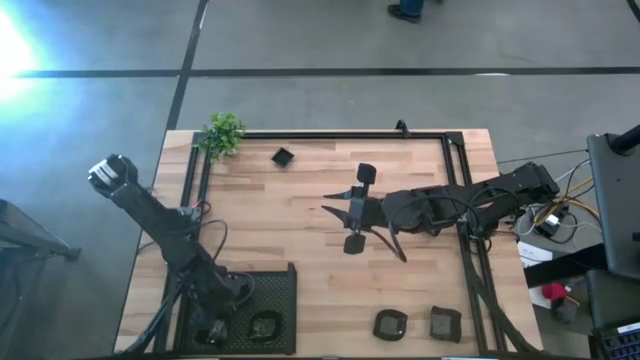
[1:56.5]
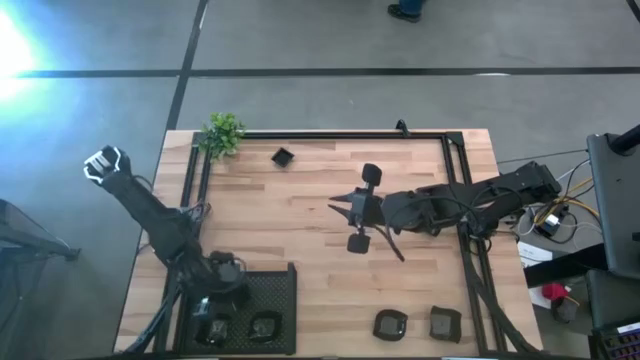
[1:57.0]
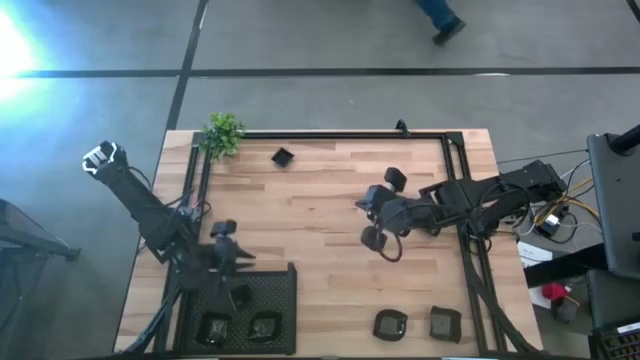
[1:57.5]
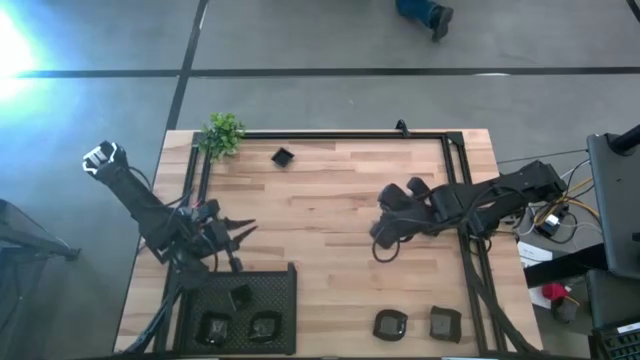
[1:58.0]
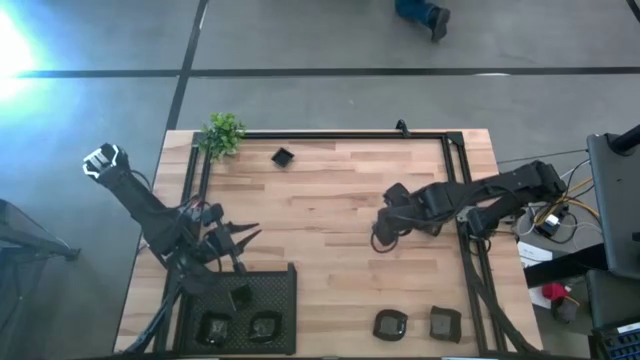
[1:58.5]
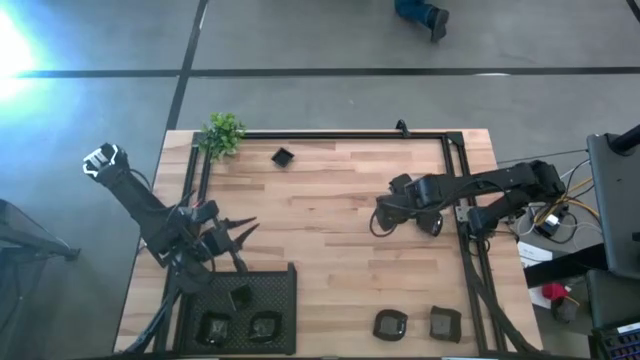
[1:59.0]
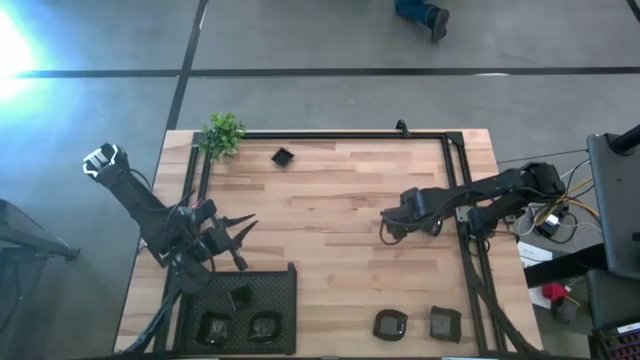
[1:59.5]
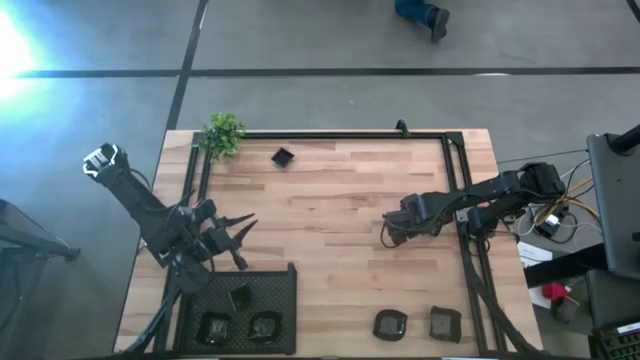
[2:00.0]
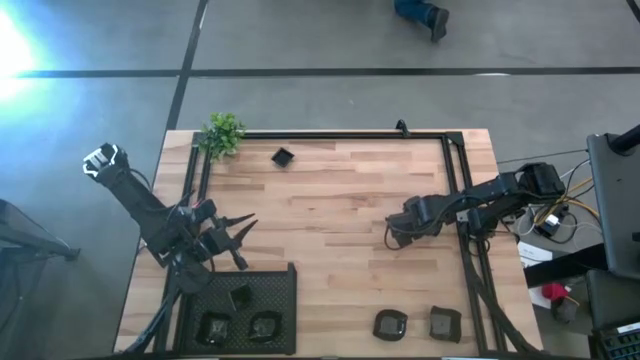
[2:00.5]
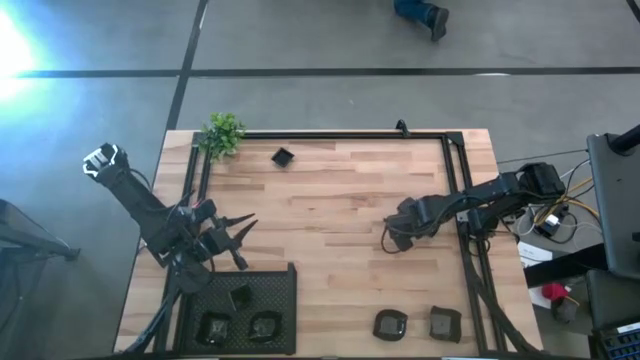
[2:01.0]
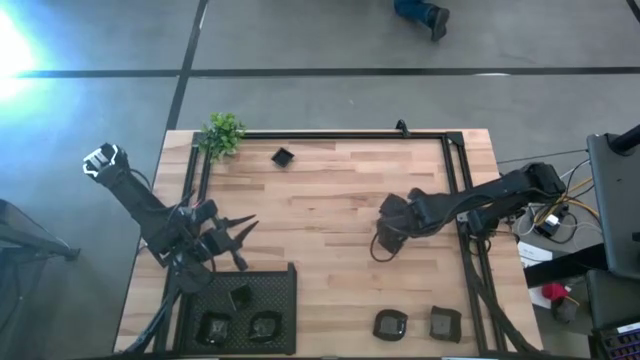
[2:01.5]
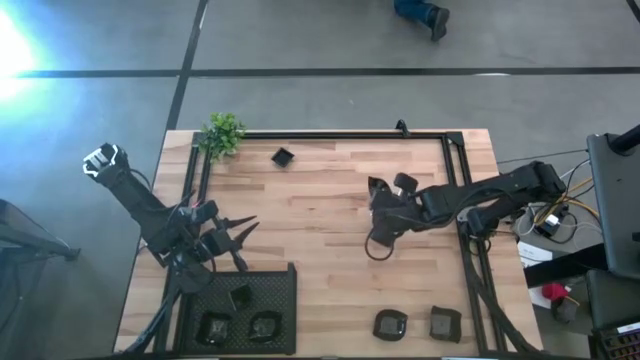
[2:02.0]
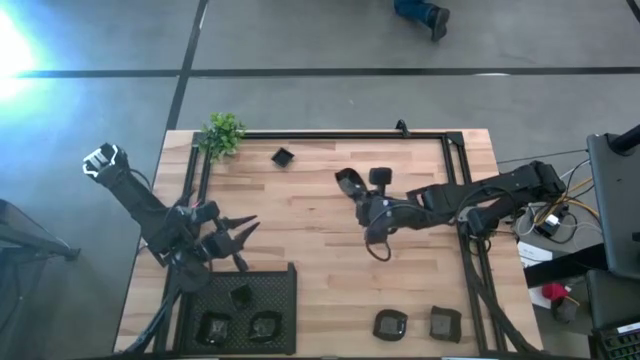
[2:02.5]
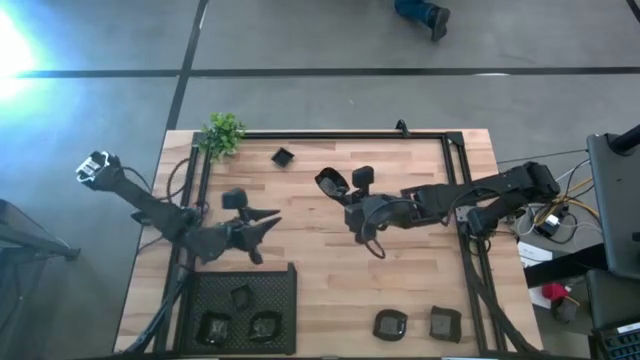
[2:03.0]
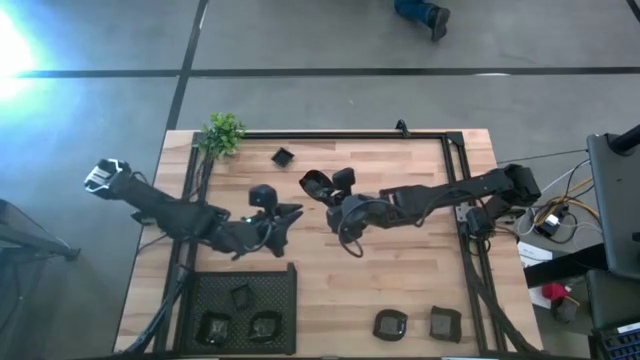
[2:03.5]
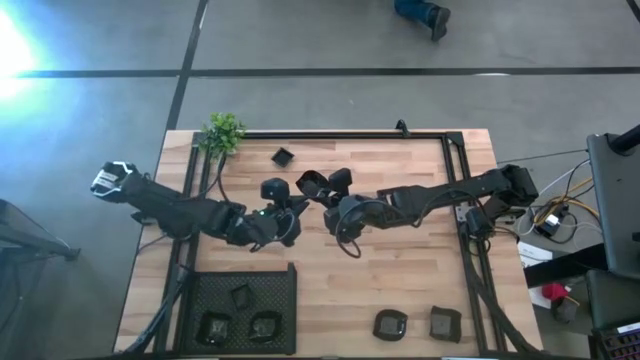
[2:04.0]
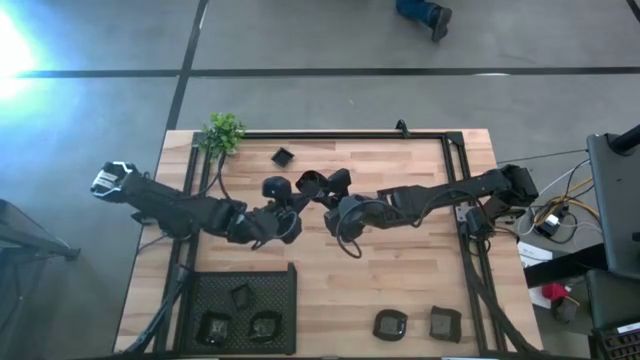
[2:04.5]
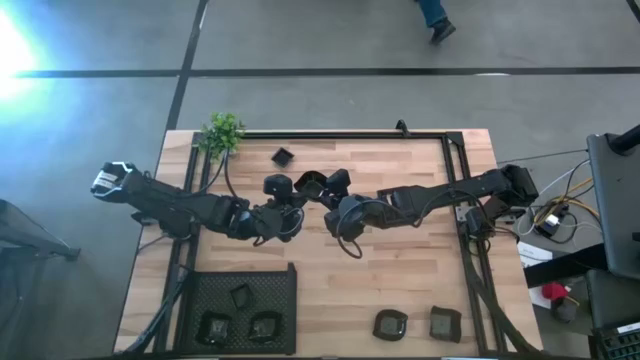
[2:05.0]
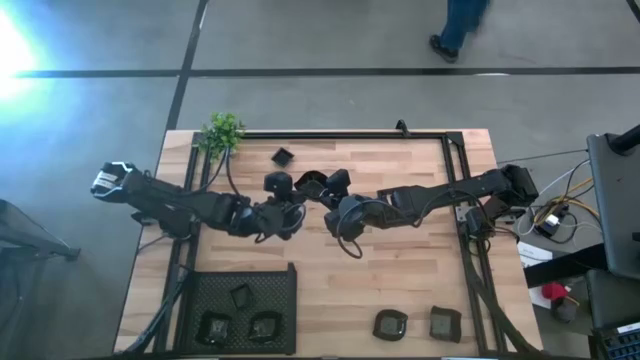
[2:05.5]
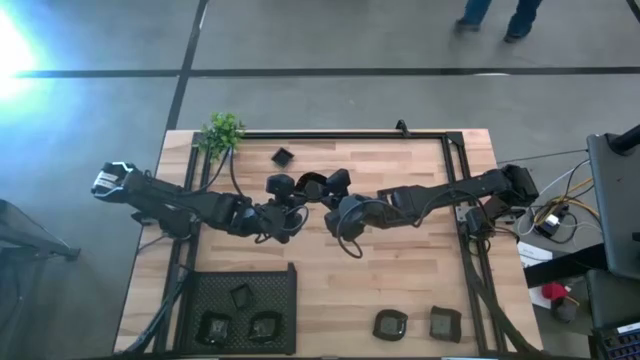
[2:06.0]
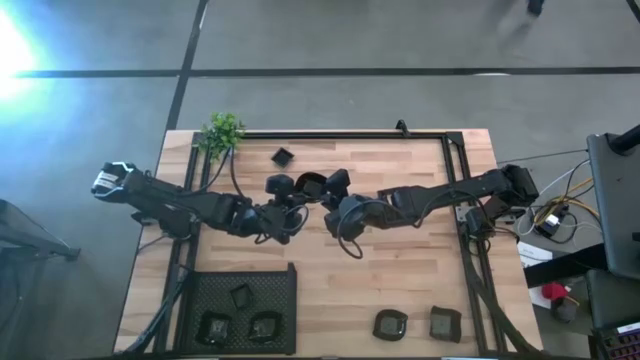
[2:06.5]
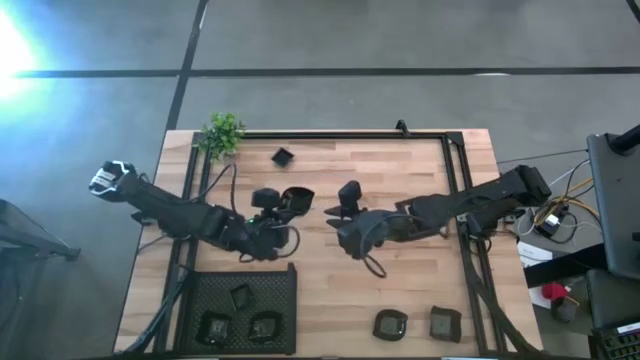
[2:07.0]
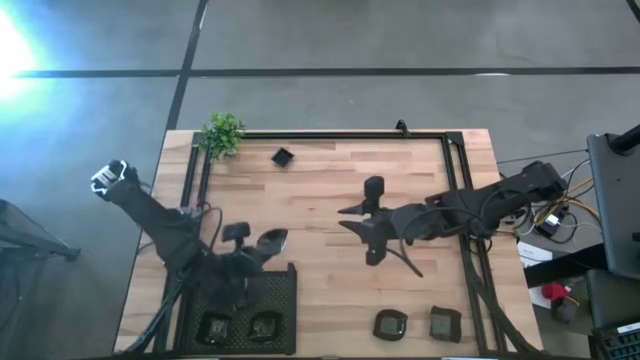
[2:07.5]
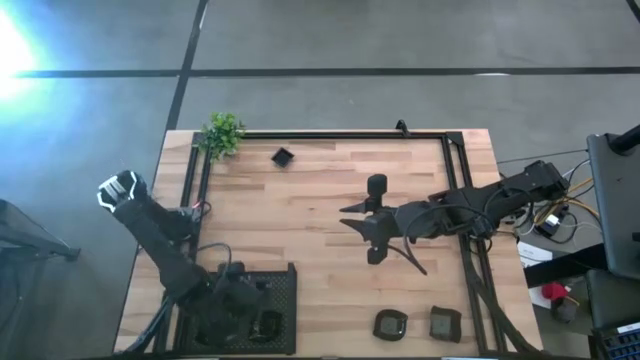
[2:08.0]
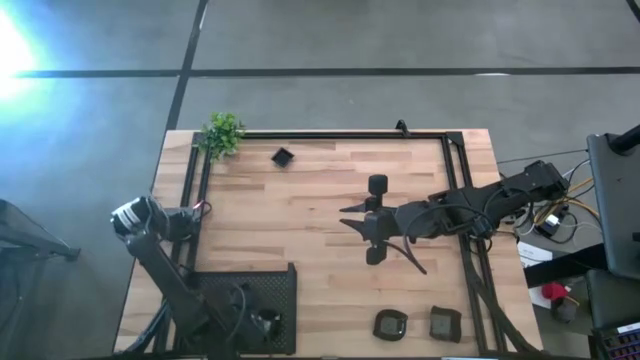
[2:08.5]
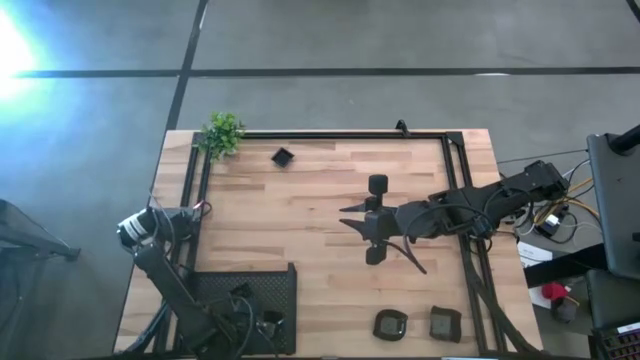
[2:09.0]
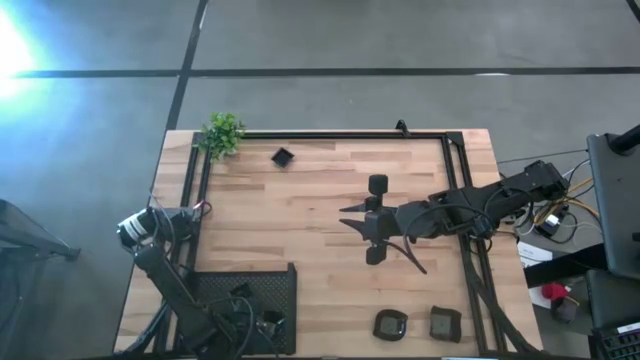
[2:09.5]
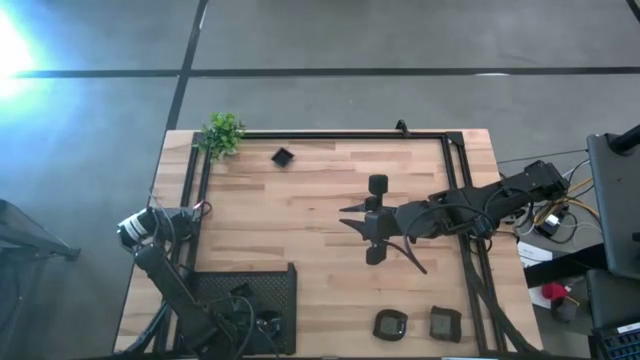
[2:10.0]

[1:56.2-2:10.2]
Task: Pick & Place Mini shaped plates
Stack the leaf shaped plate on top of the leaf shaped plate on the shelf

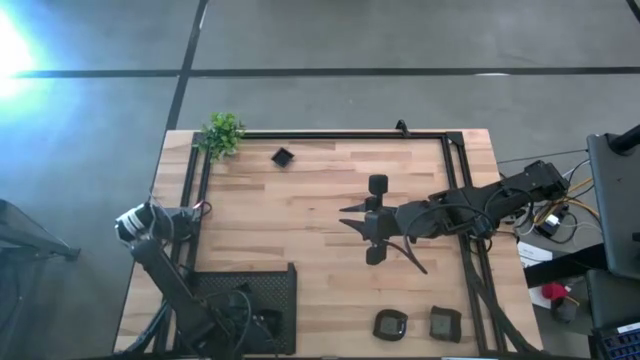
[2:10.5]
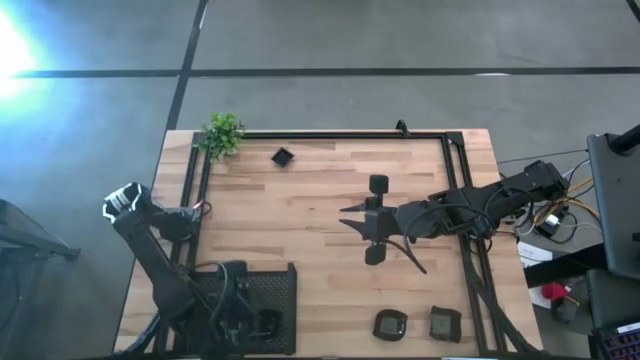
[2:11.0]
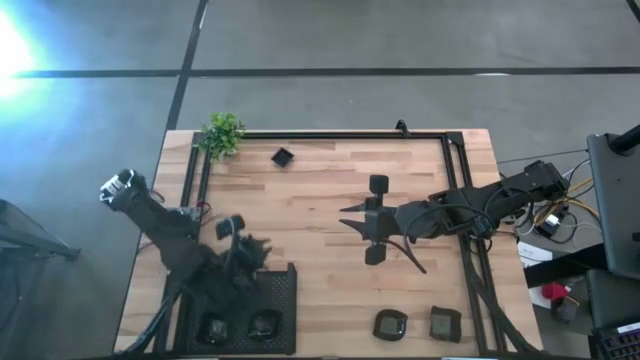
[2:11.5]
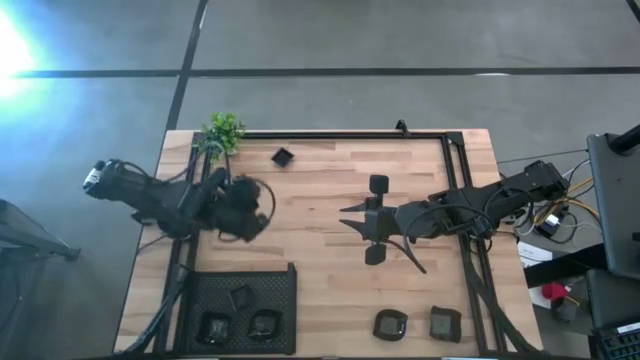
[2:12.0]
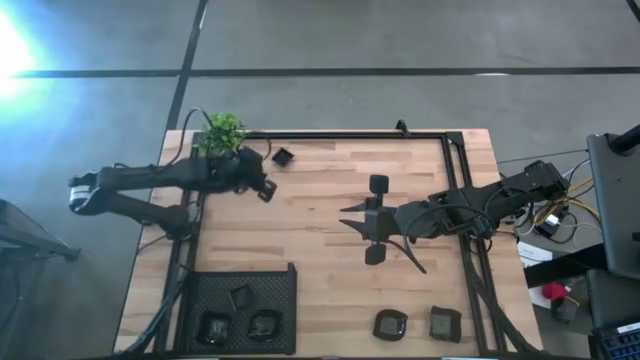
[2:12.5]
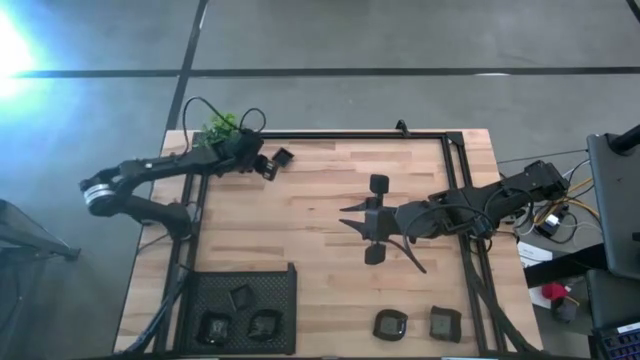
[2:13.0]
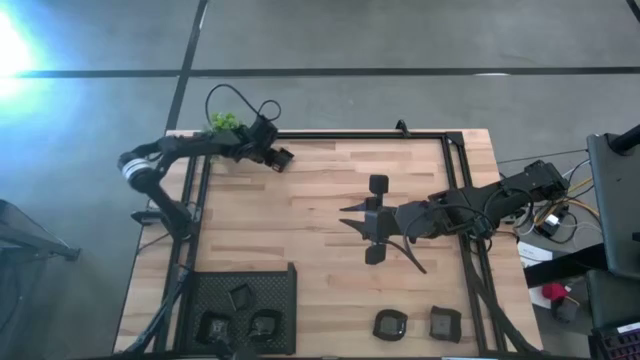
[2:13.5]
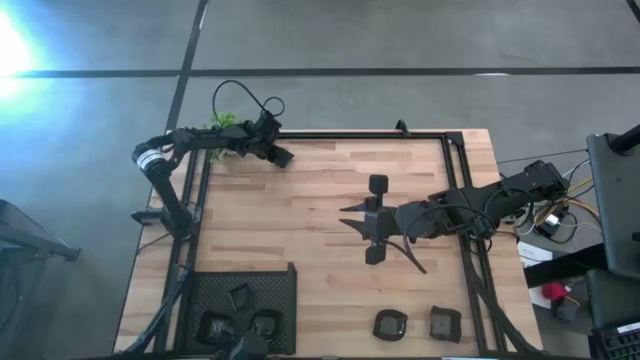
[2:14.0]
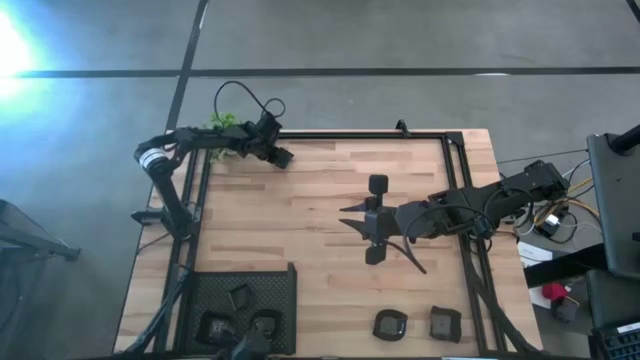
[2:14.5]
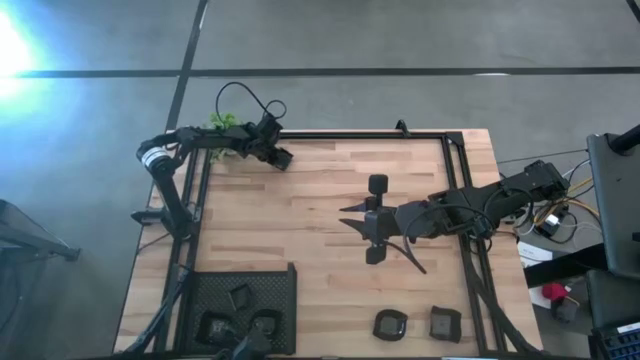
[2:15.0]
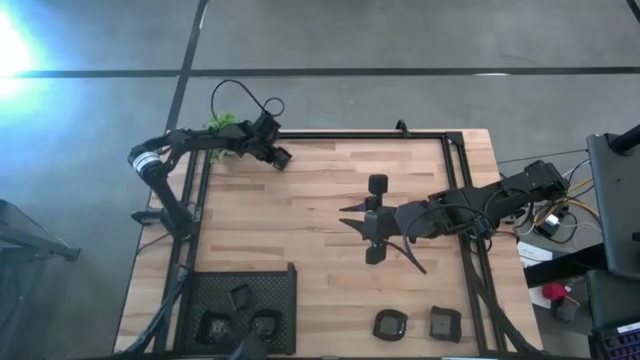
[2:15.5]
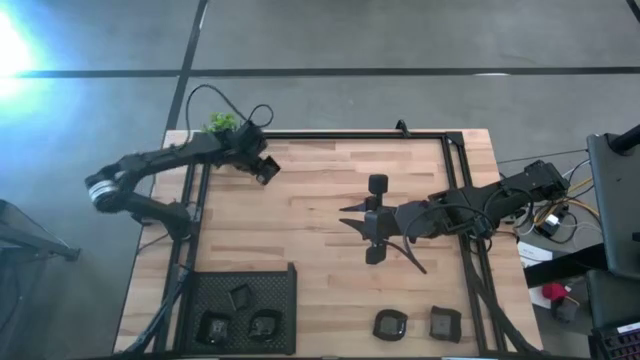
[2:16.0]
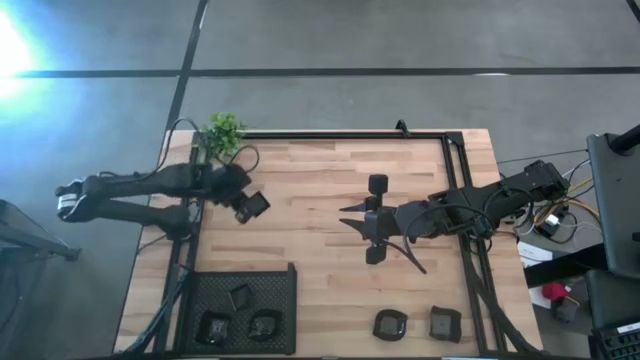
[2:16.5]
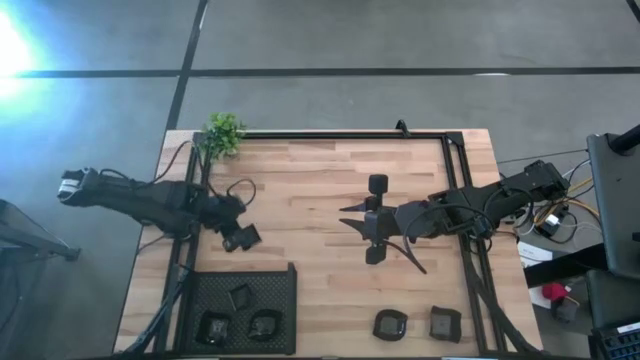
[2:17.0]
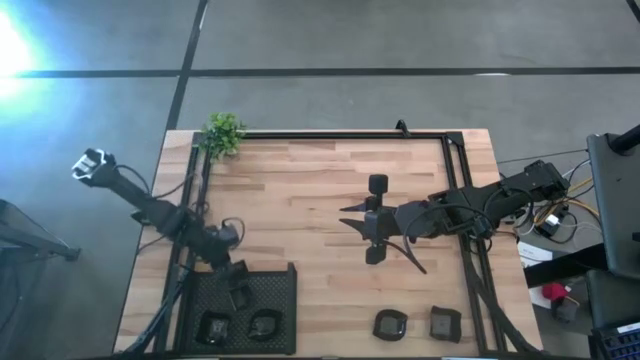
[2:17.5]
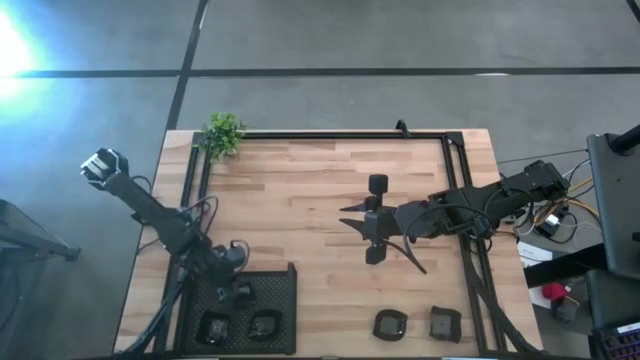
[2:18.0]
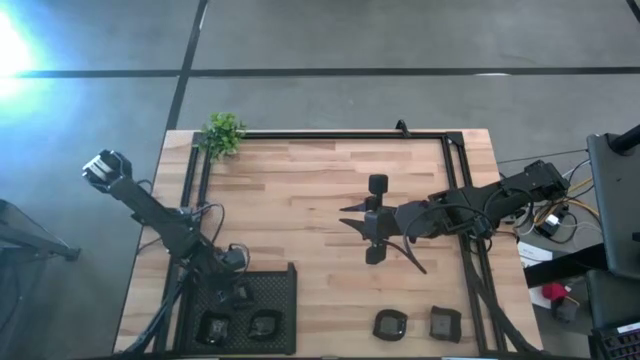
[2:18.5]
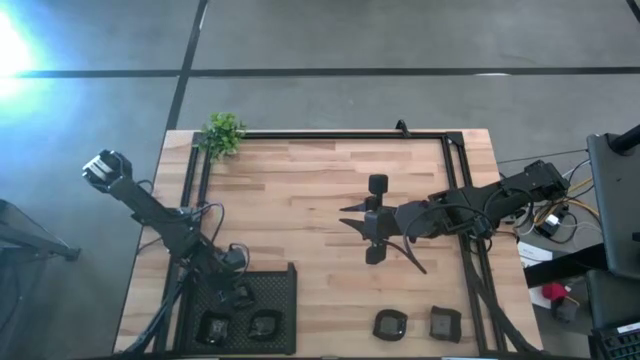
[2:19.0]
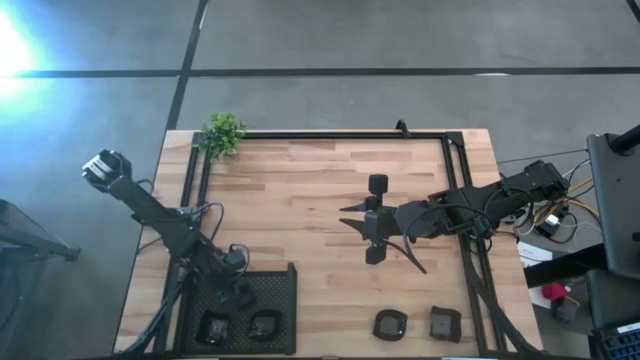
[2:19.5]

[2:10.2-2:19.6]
Stack the square plate on top of the square plate on the shelf
